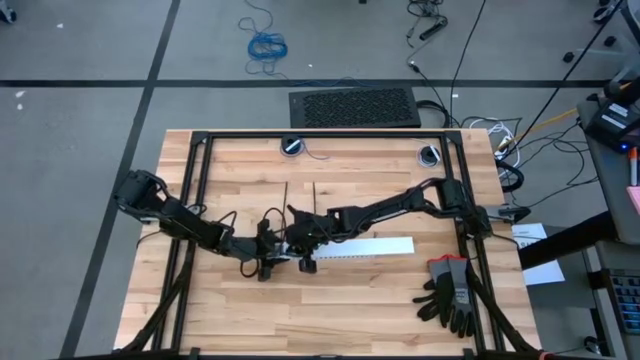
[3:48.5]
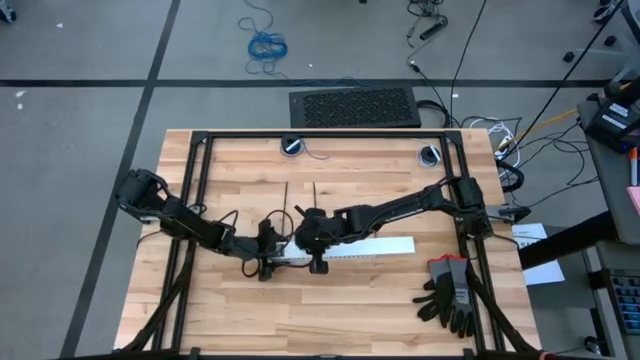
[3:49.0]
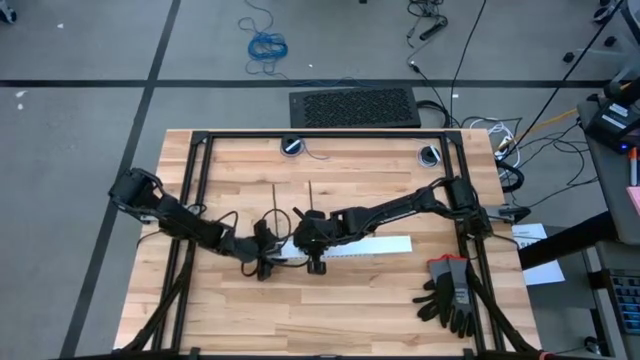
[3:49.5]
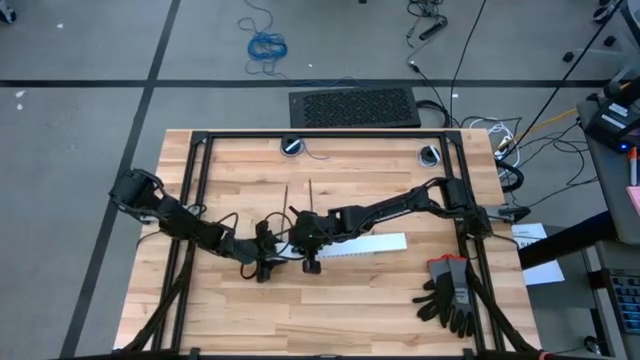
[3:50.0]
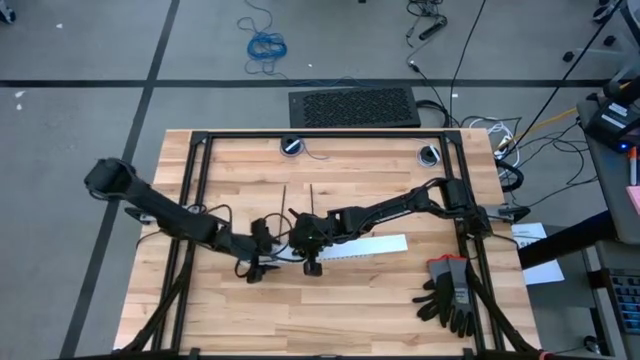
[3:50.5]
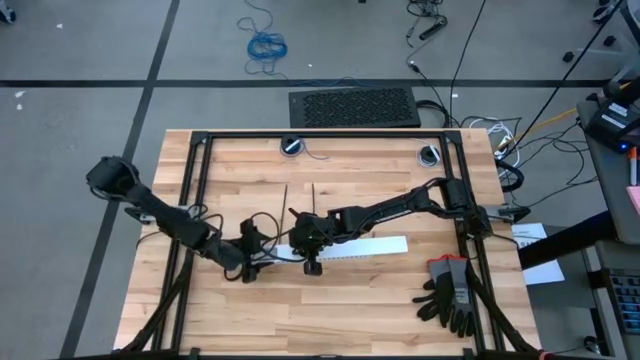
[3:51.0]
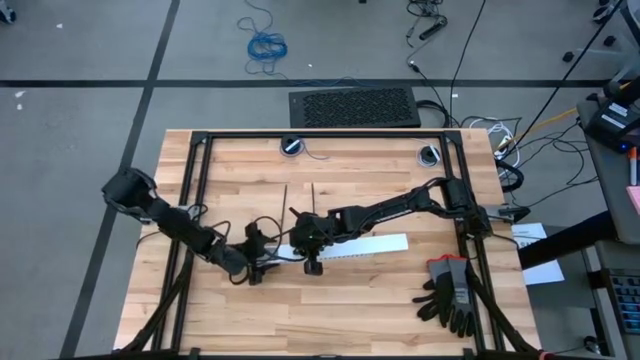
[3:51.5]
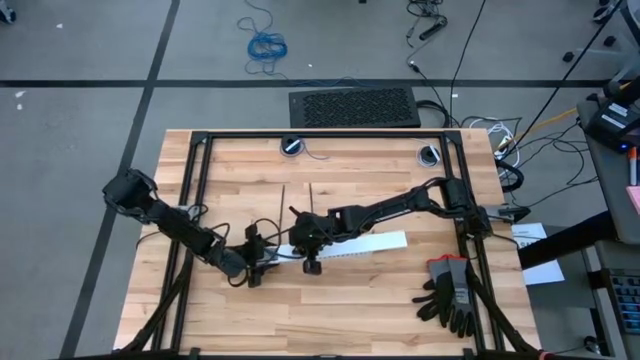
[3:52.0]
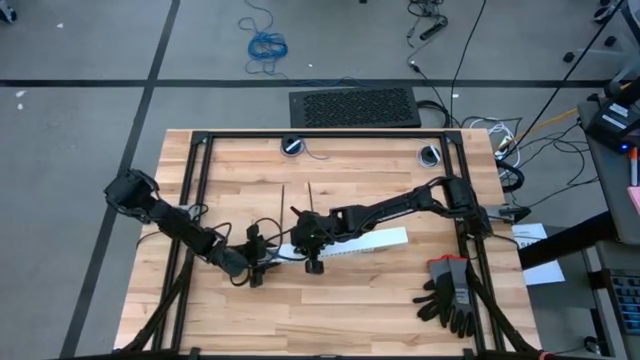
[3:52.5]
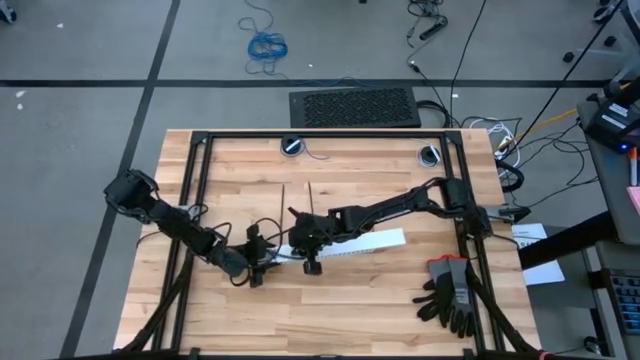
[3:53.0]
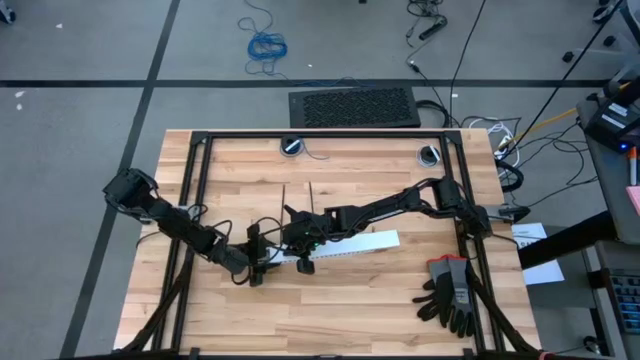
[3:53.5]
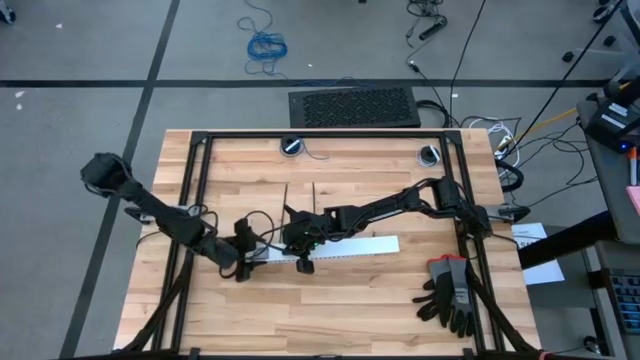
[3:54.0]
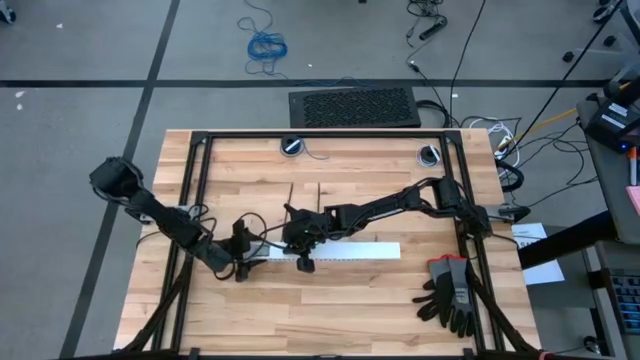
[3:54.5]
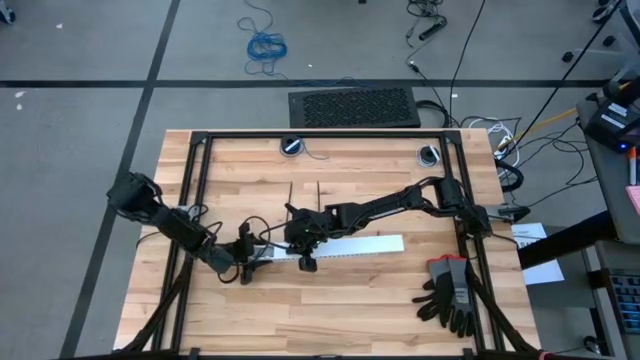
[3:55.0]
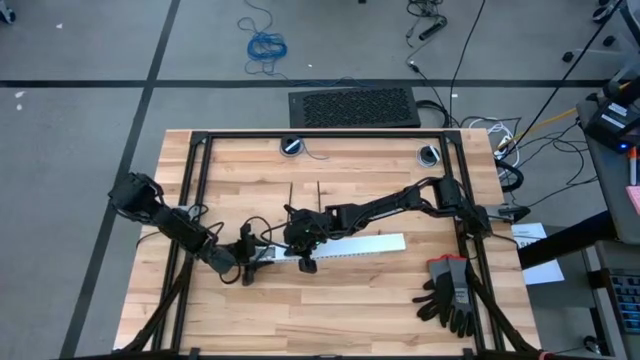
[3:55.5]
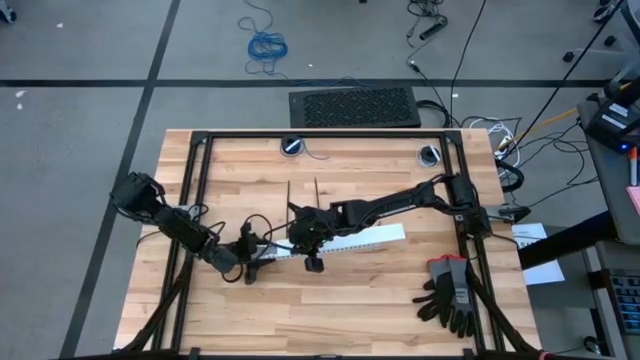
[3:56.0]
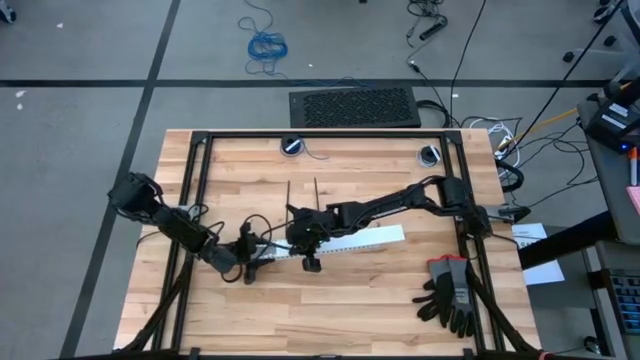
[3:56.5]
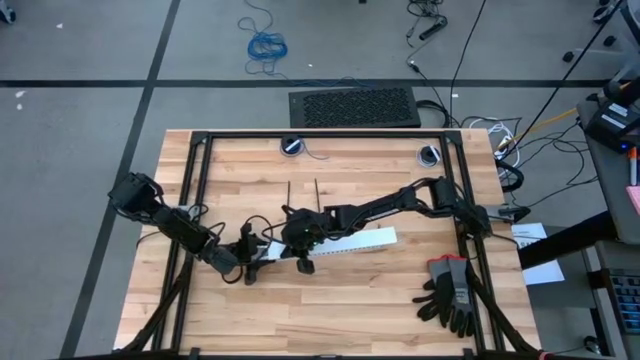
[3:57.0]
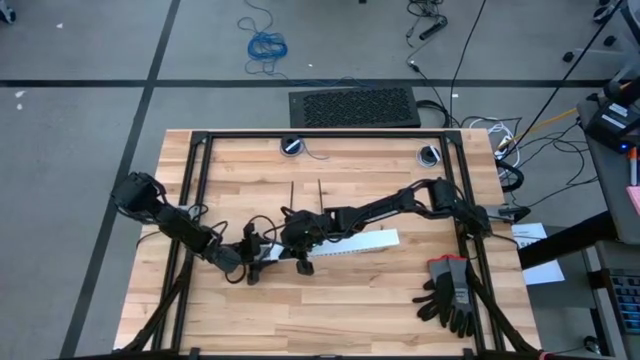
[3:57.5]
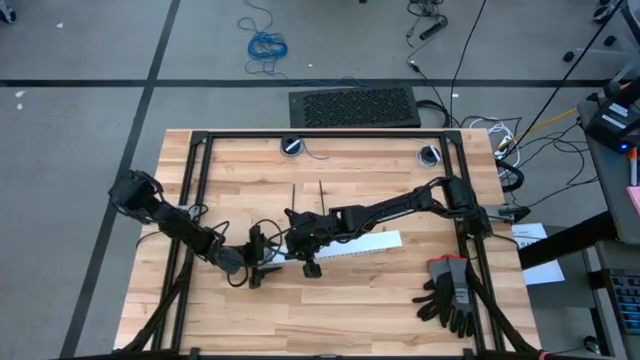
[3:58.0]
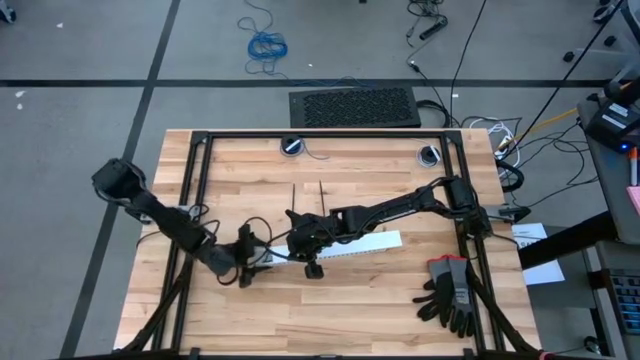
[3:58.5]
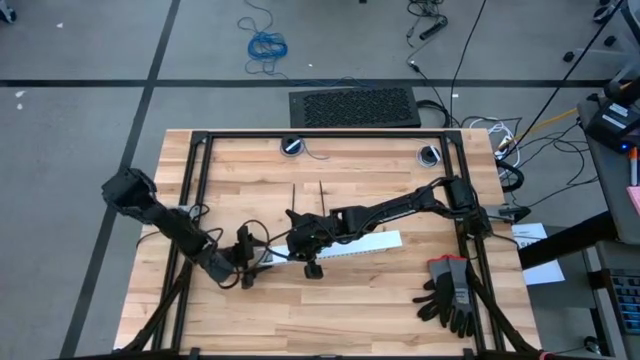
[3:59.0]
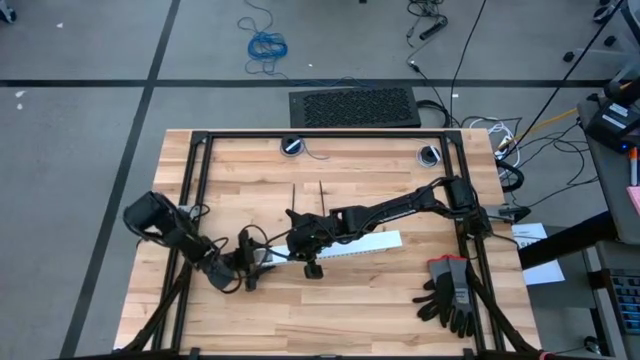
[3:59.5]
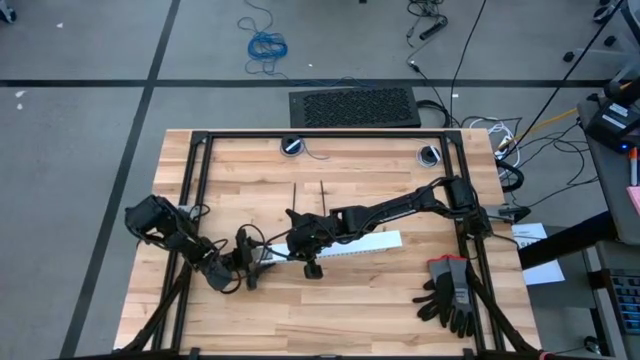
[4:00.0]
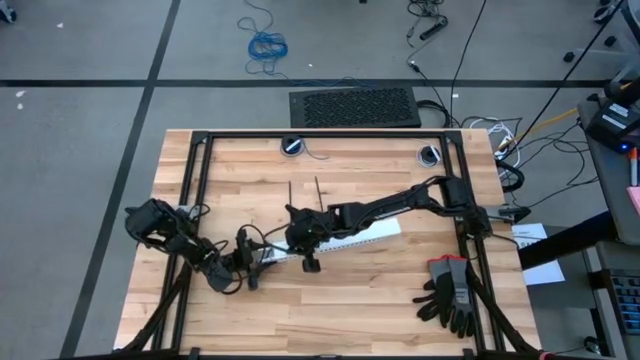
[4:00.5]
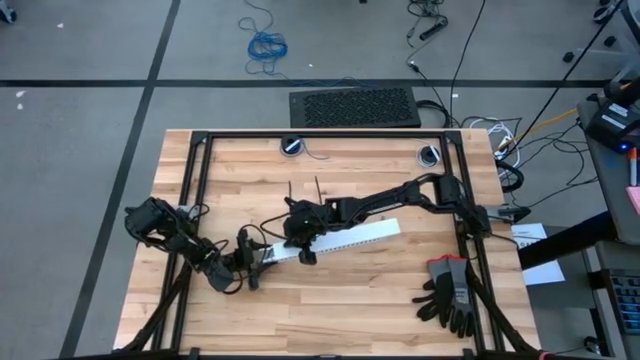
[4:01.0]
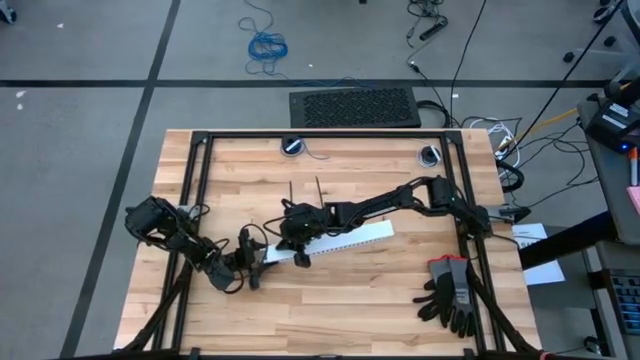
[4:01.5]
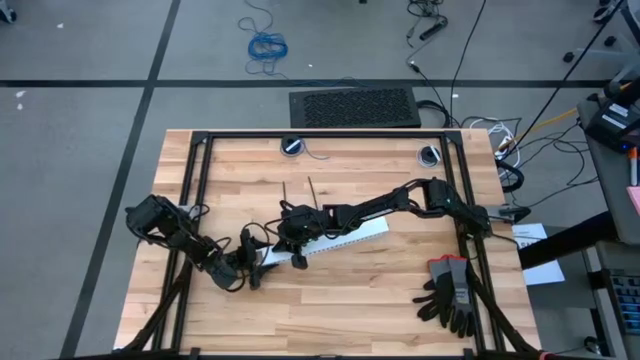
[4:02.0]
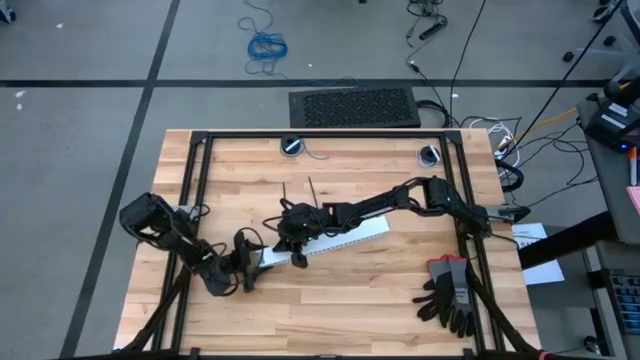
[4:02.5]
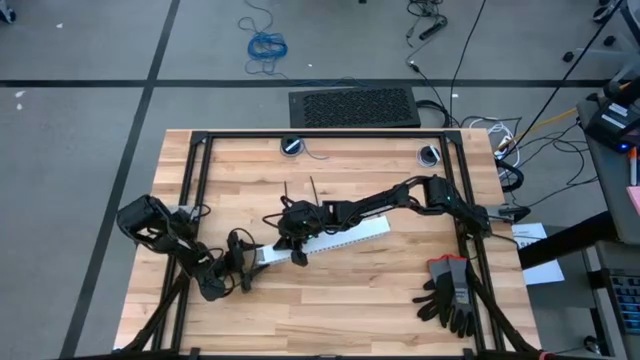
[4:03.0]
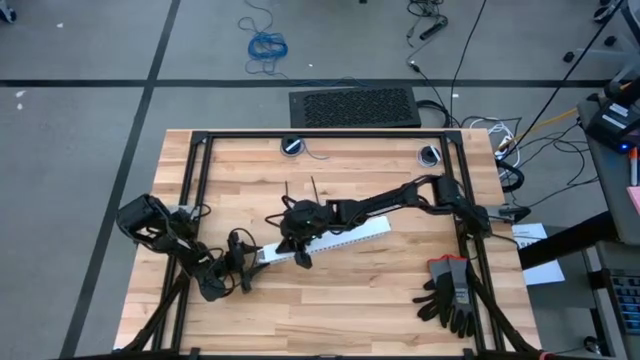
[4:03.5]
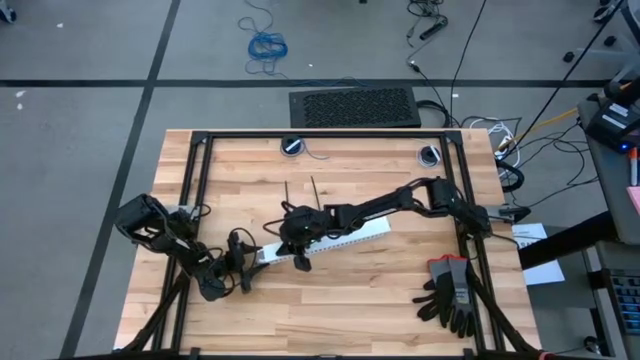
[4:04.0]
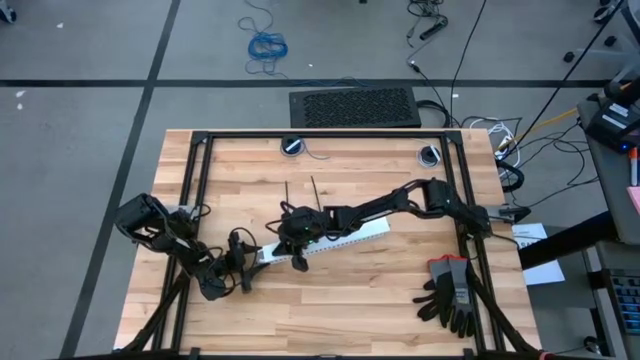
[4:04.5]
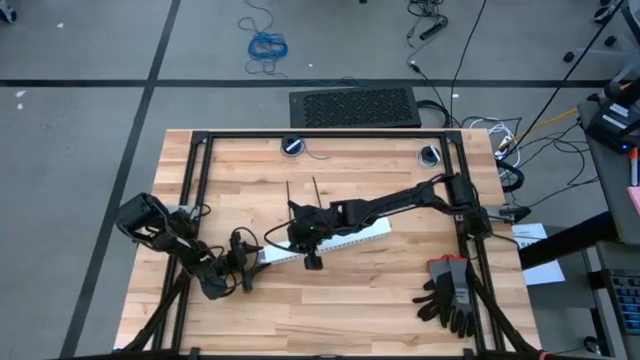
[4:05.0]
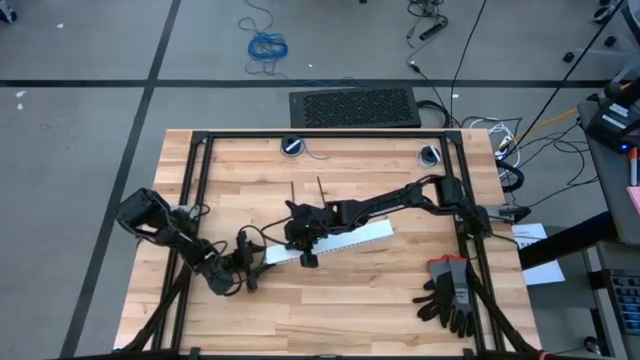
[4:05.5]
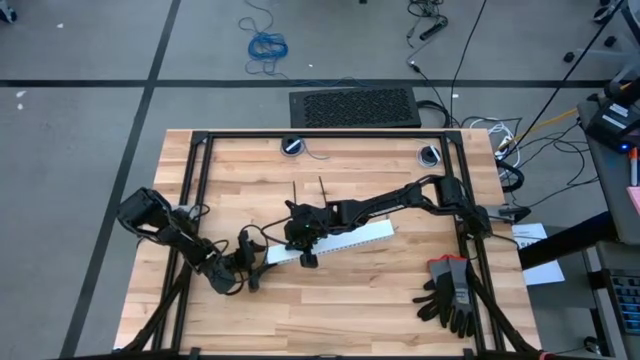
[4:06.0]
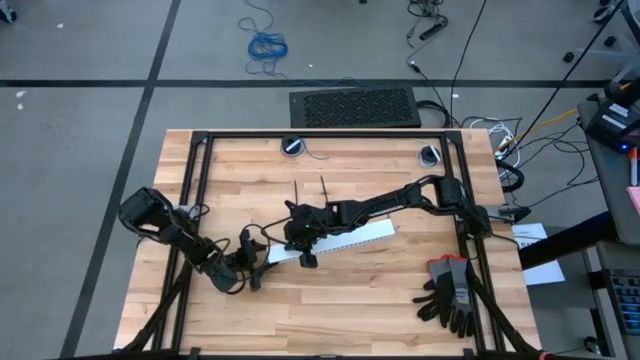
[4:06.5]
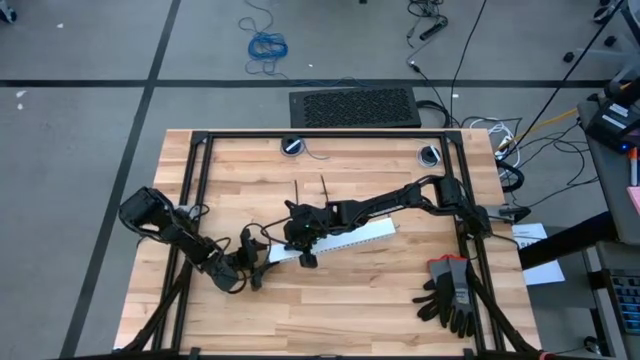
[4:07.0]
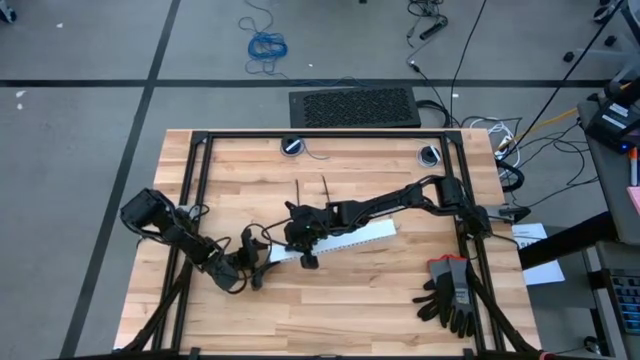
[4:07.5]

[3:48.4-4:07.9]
Task: Ziptie cables
Close the white cable duct

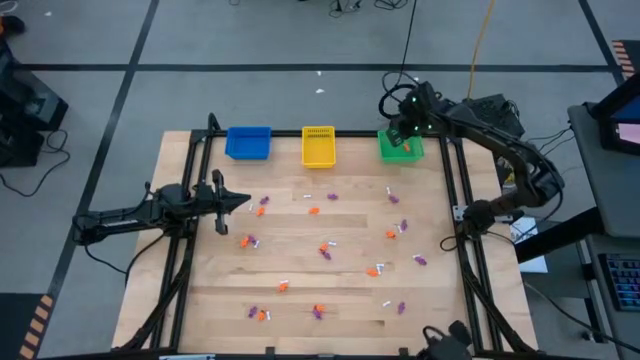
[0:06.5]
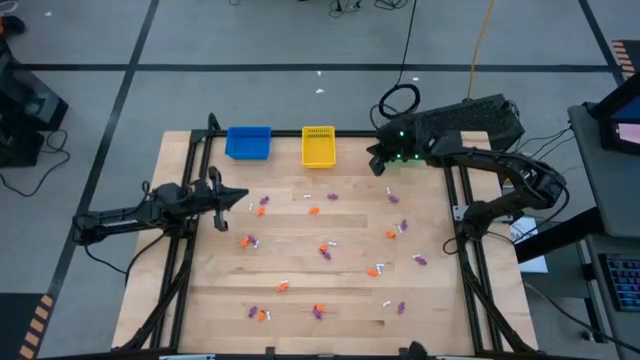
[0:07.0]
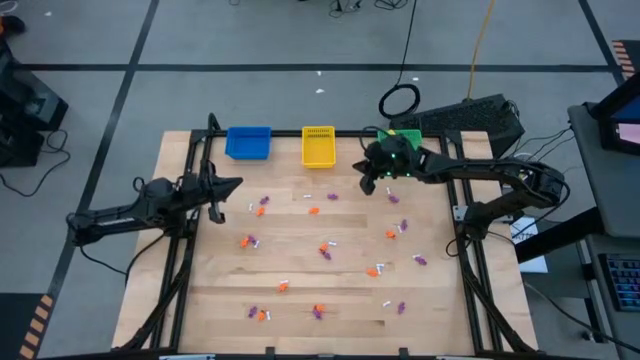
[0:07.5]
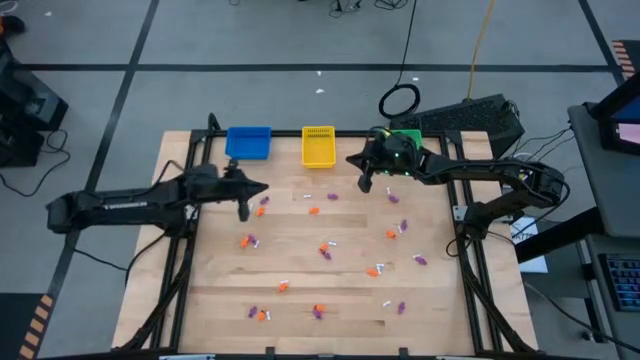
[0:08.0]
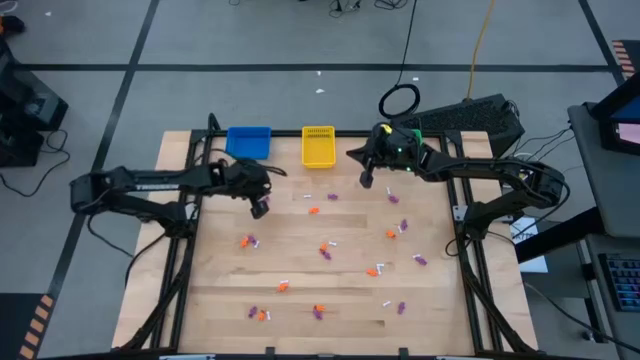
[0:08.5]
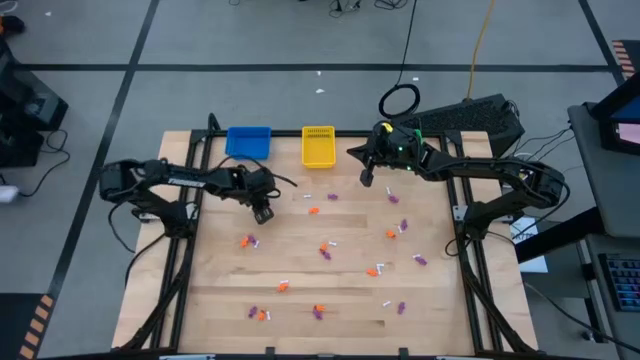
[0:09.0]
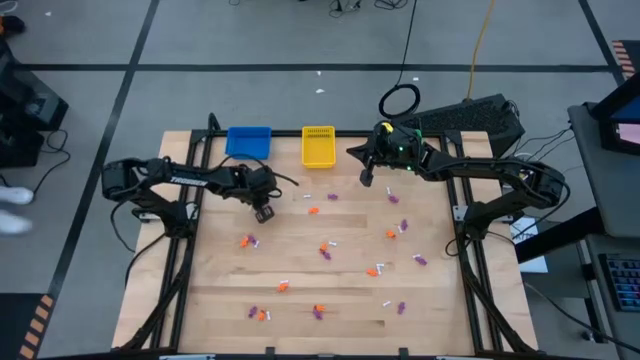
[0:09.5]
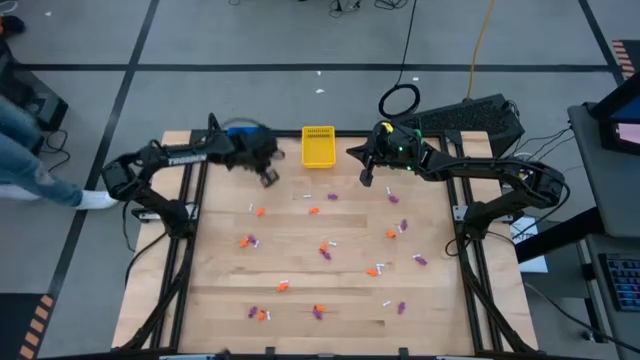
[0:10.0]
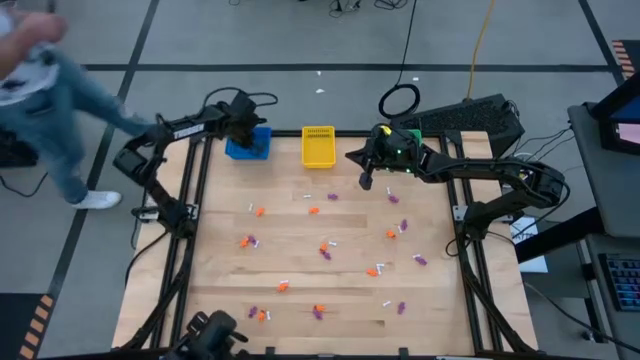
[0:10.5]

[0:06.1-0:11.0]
Task: Sort Halloween decoration
Put the violet skeleton toy into the blue bin
